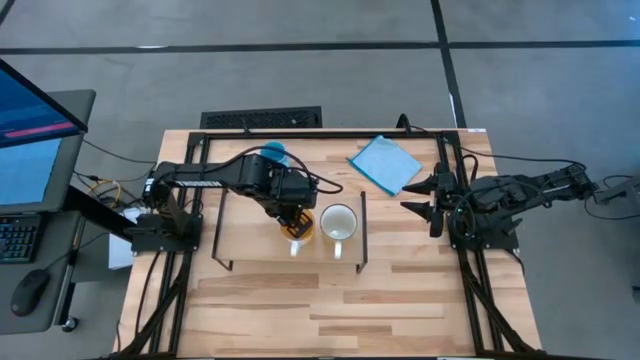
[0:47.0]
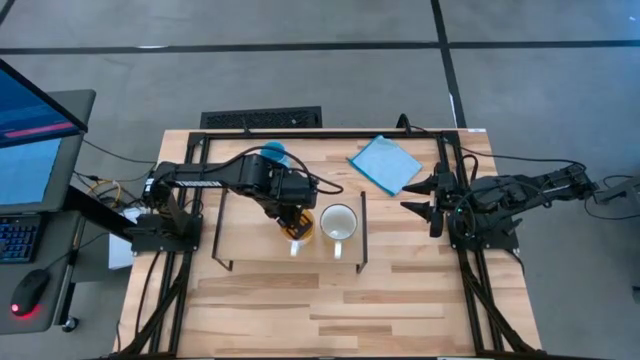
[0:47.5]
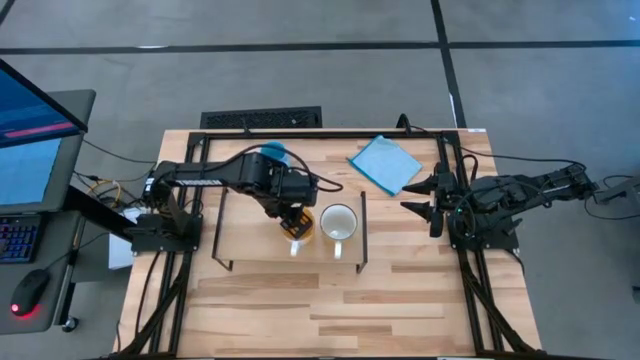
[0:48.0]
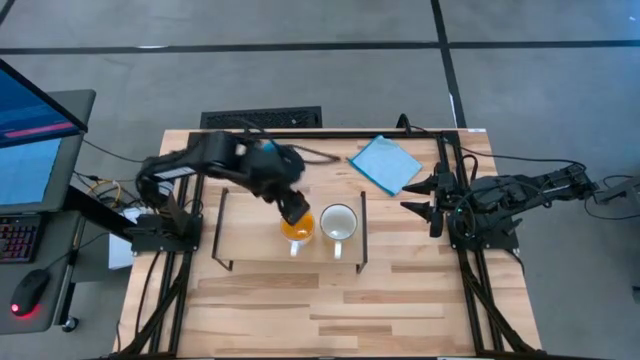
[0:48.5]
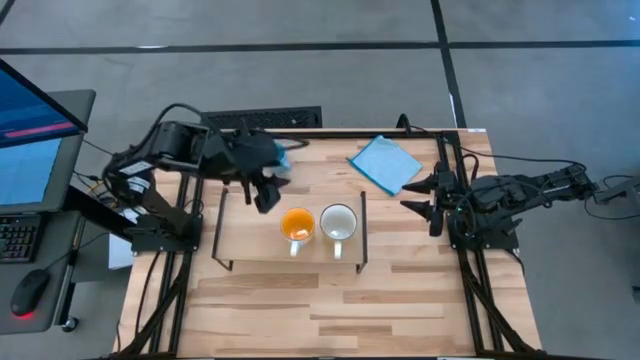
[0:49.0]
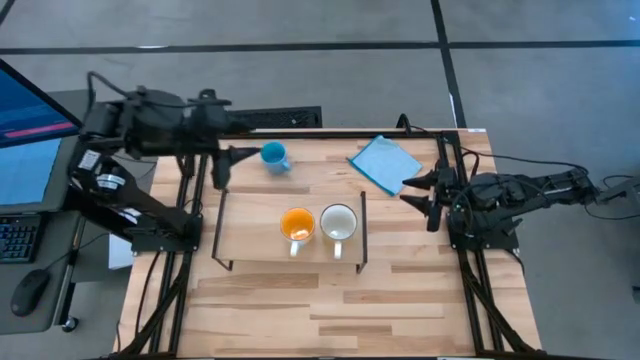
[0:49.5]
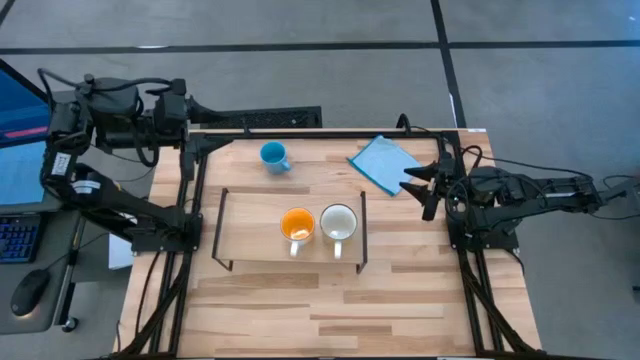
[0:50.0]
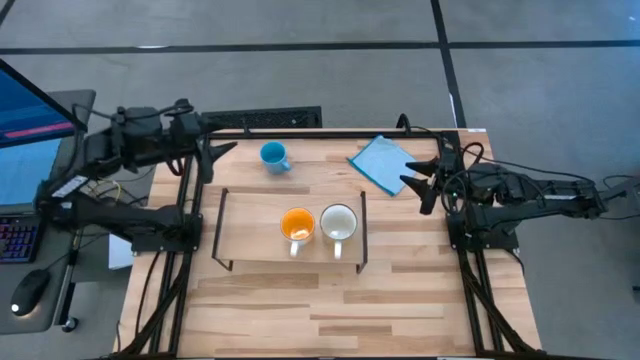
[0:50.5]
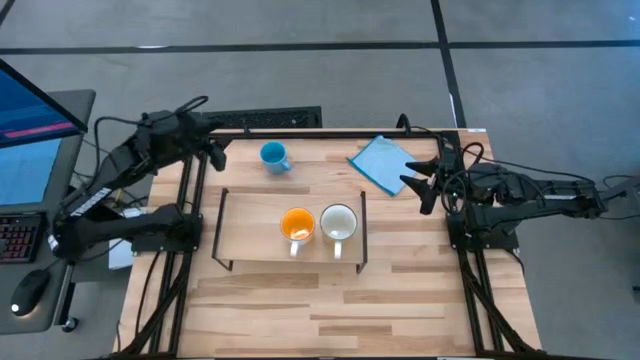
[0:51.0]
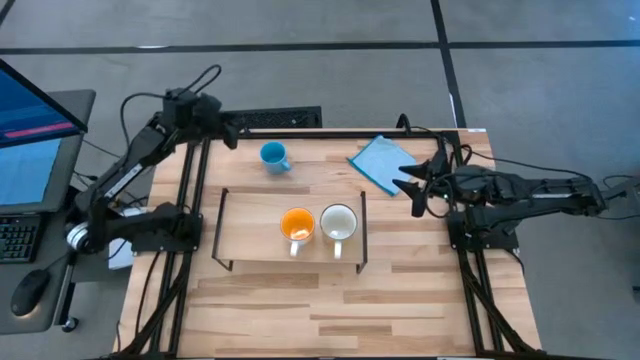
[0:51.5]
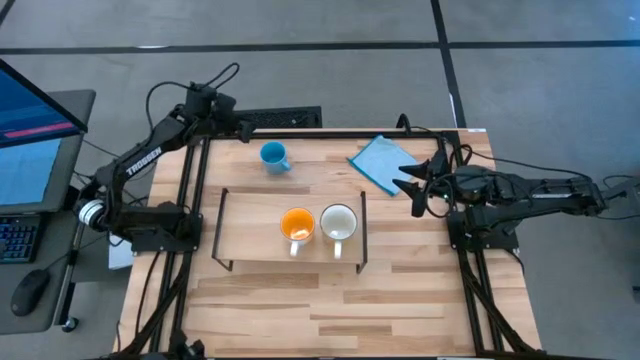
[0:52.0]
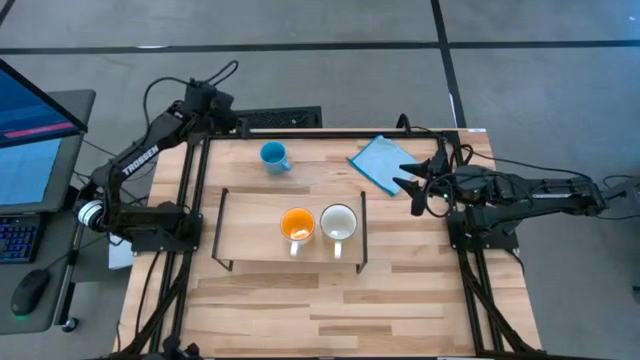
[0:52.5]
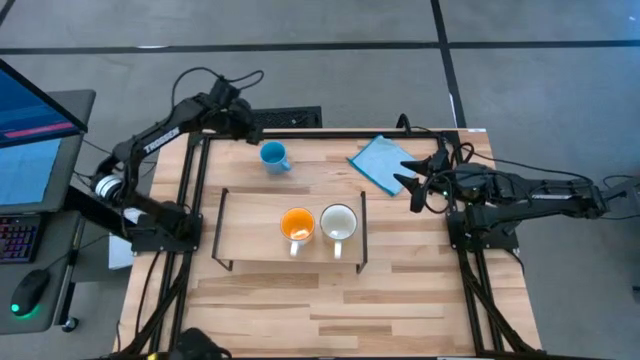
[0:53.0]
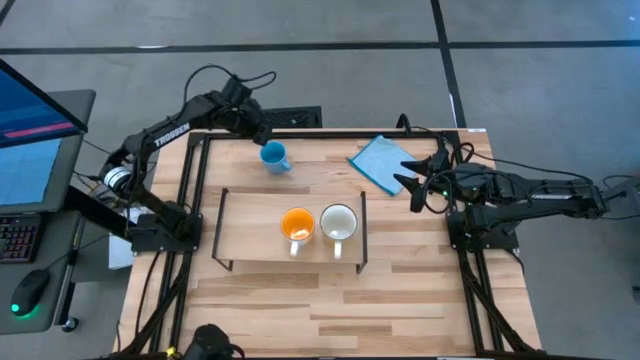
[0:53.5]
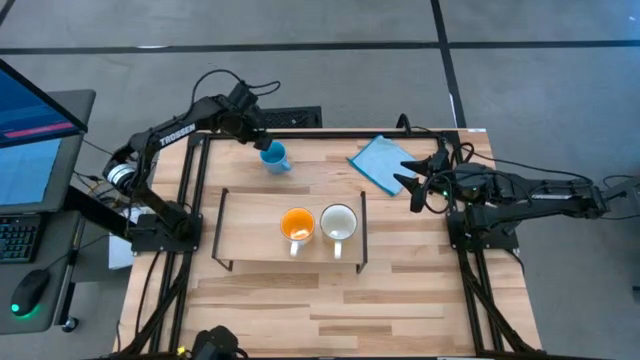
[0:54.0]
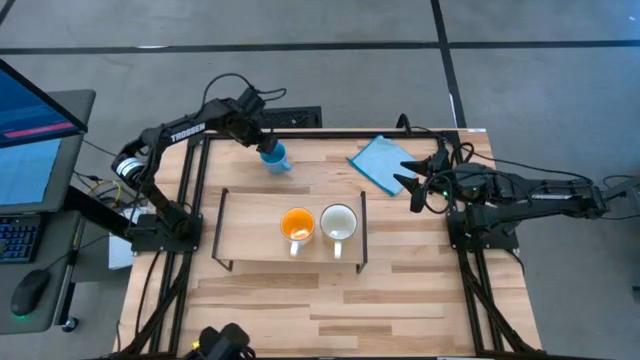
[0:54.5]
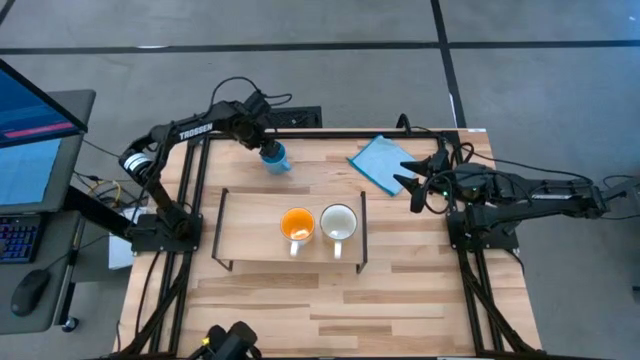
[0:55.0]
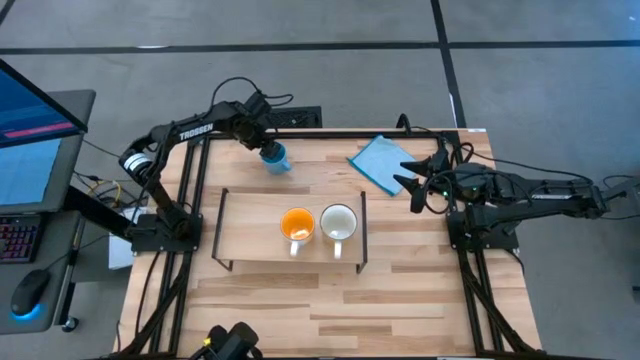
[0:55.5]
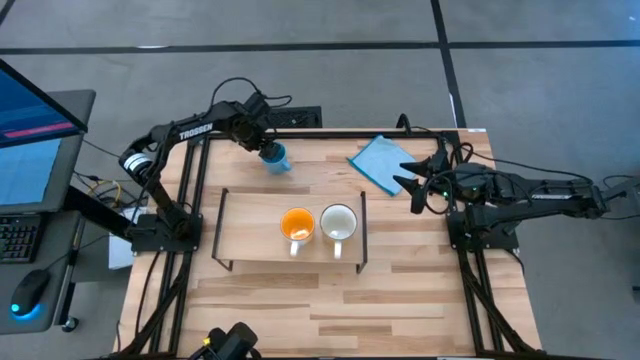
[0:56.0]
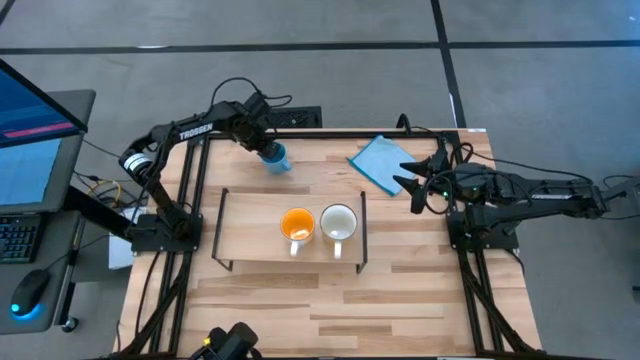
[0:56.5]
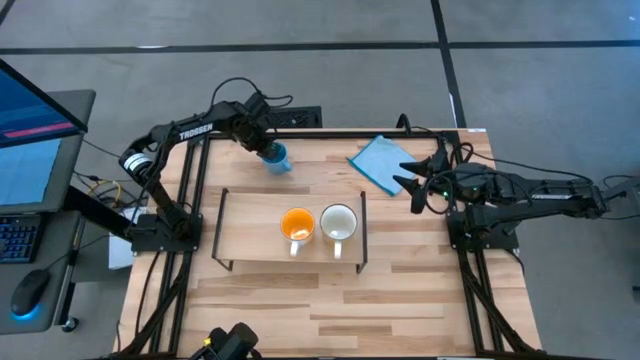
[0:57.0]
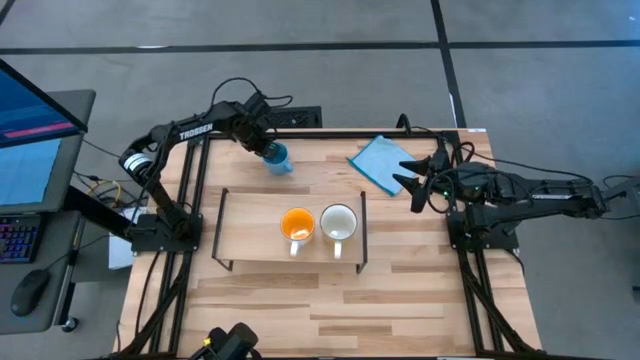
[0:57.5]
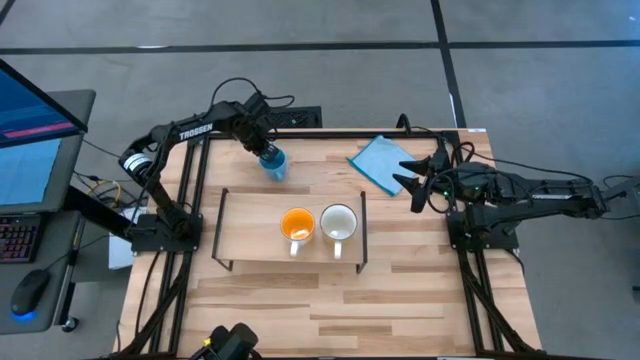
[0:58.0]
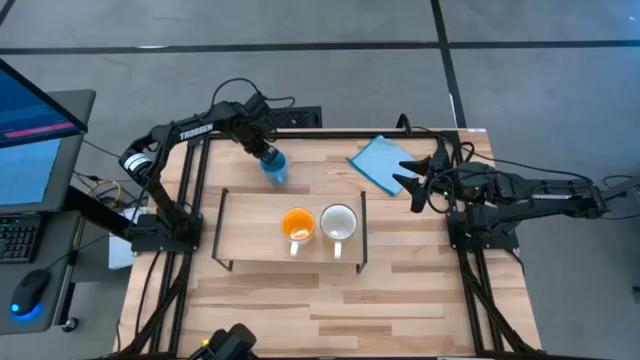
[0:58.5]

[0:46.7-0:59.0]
Task: Stack small to large cups/mugs on shelf
Put the blue mug on the shelf

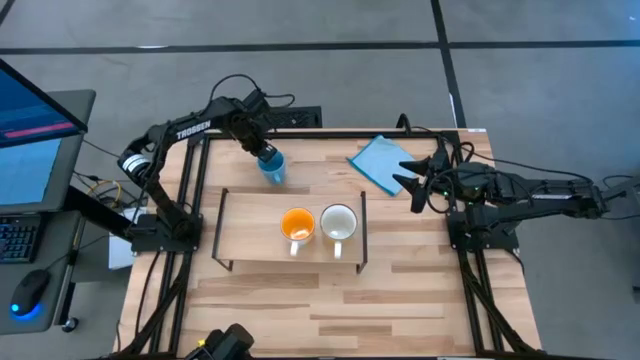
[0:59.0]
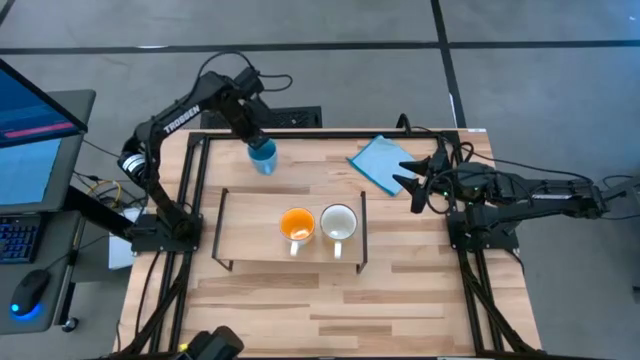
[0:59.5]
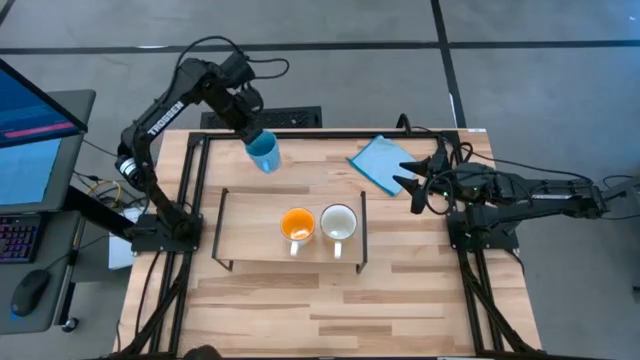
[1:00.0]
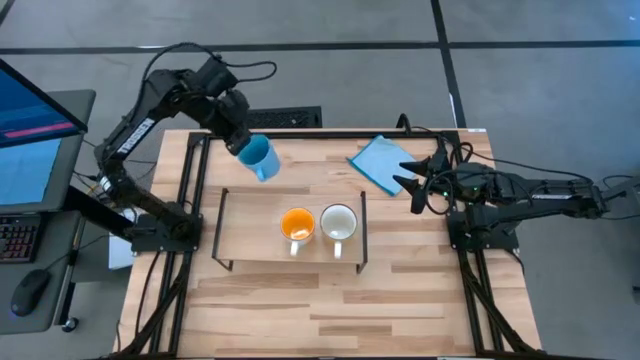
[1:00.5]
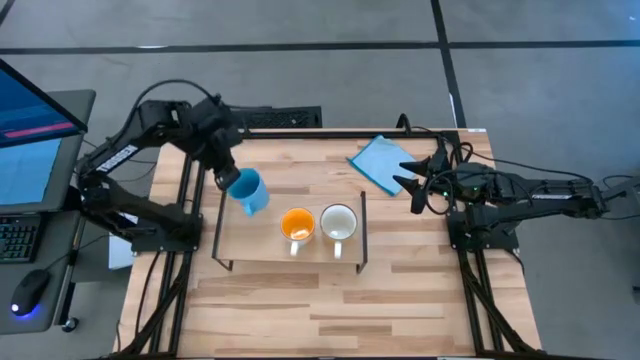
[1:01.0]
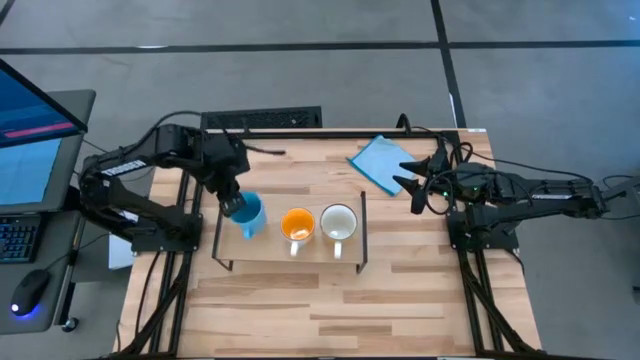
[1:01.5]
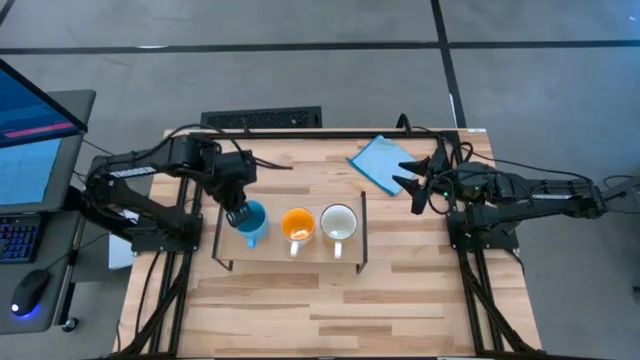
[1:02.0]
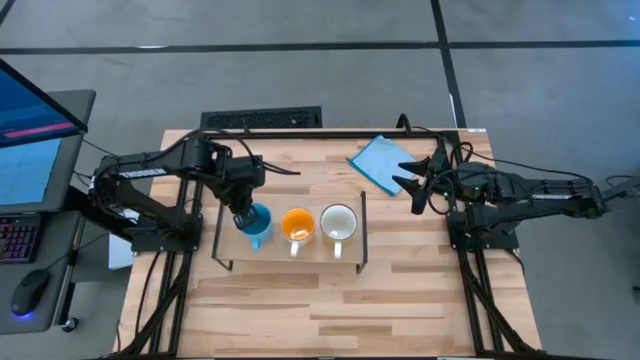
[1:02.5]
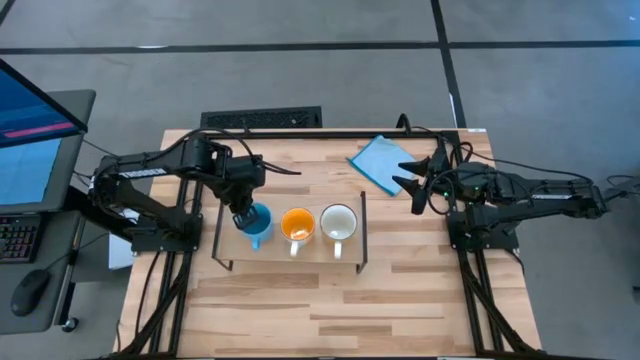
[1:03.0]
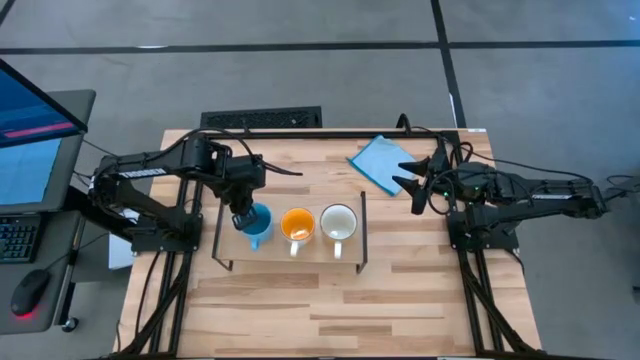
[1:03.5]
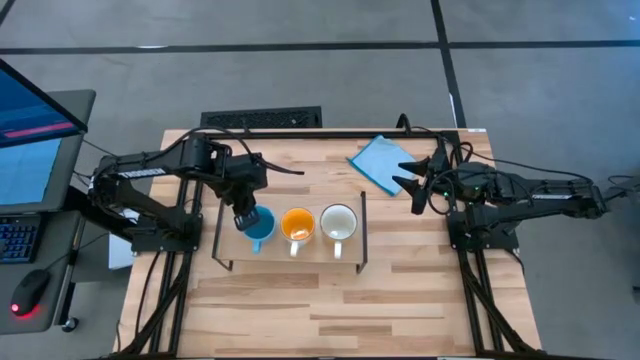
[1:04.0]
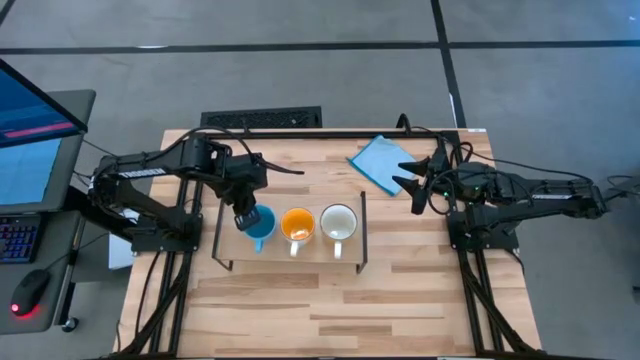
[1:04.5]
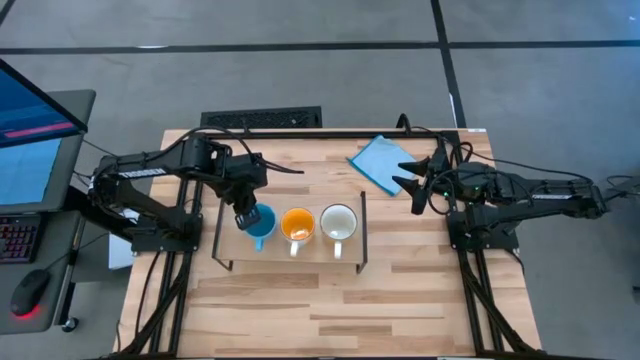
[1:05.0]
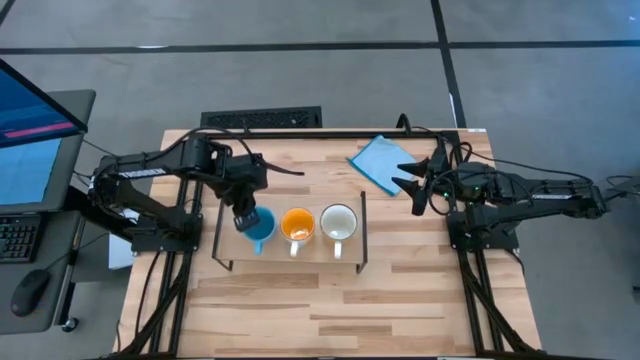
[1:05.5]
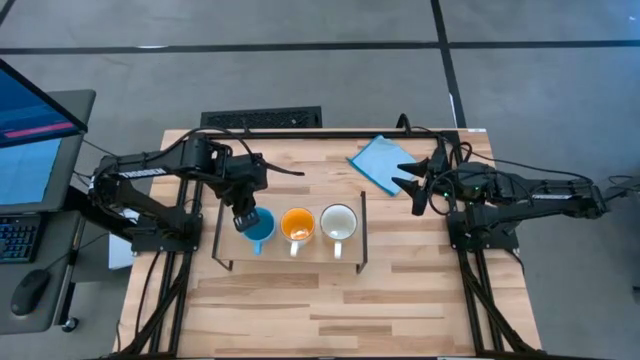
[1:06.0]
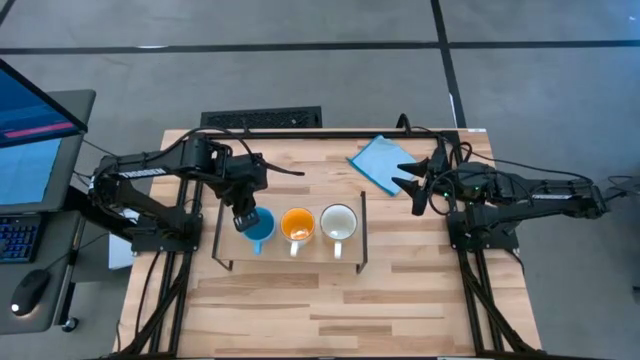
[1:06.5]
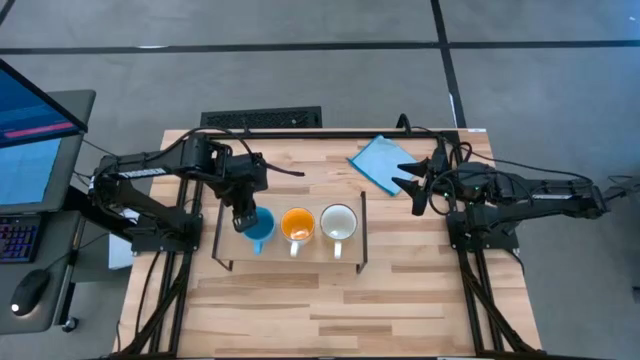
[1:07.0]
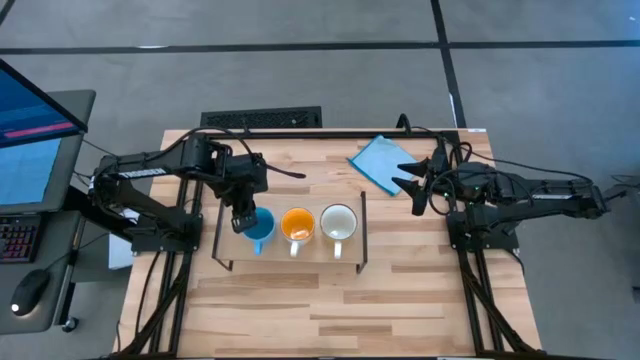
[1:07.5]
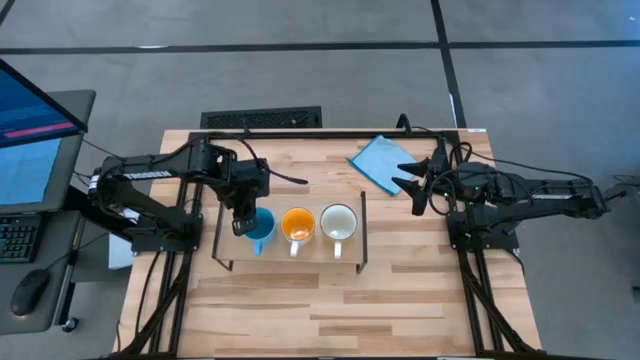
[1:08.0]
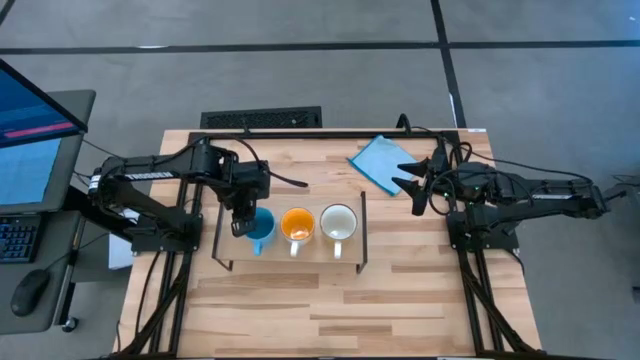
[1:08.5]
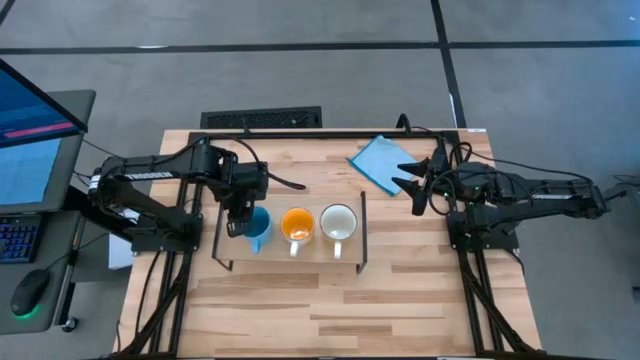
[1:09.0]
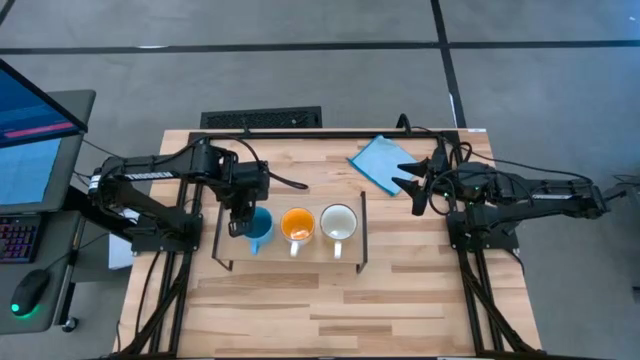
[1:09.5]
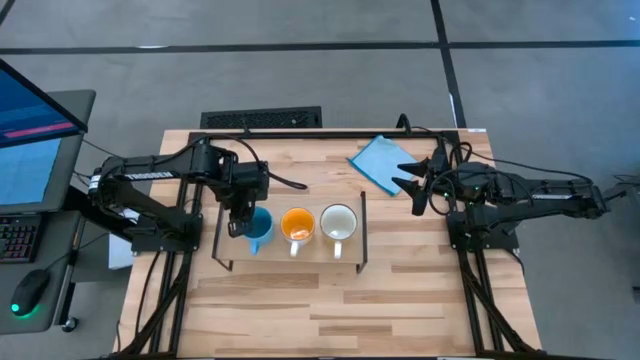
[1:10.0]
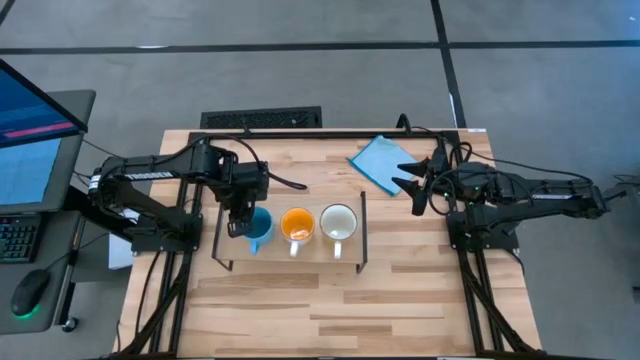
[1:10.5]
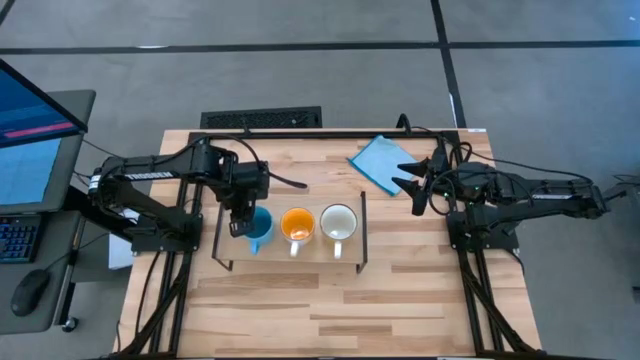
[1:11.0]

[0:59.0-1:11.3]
Put the blue mug on the shelf
